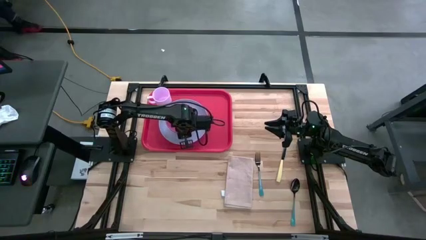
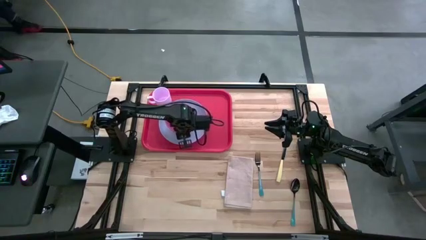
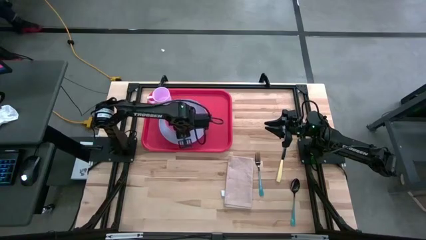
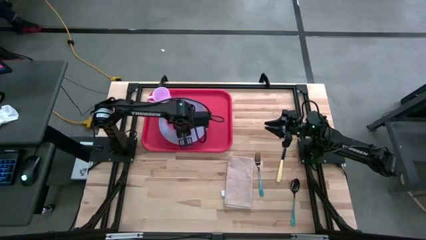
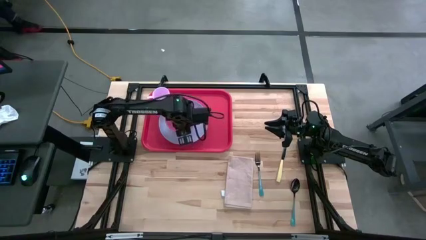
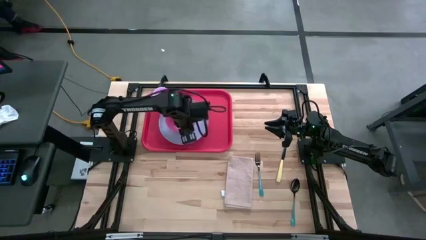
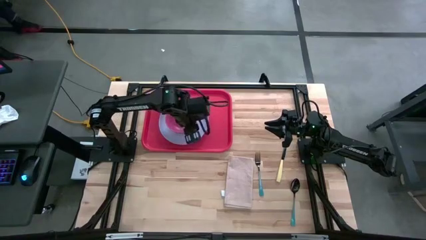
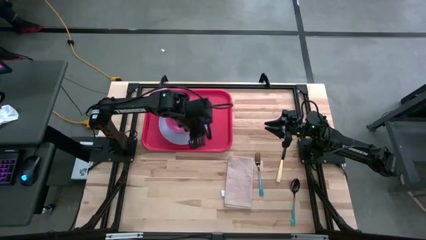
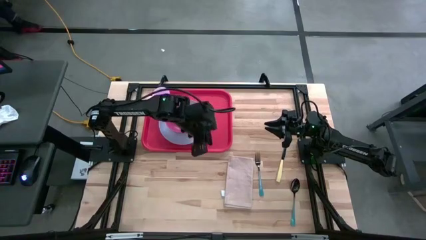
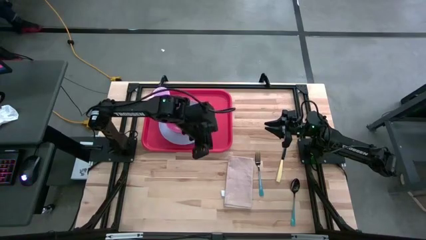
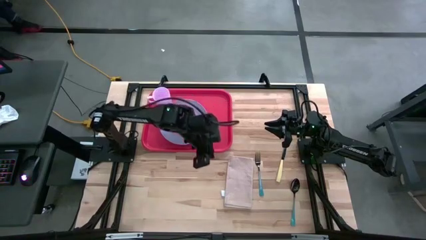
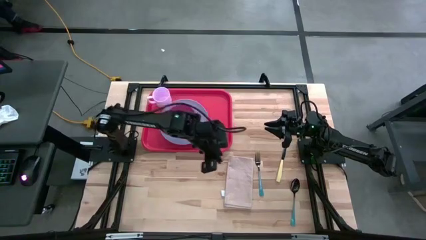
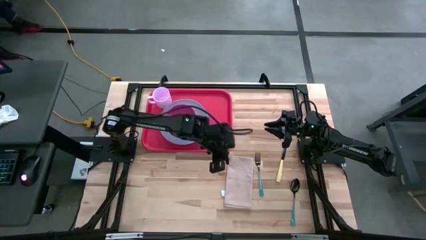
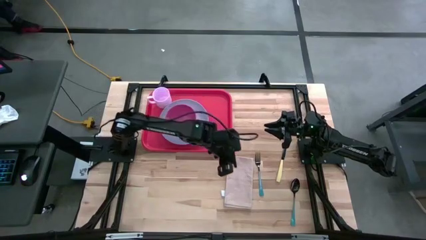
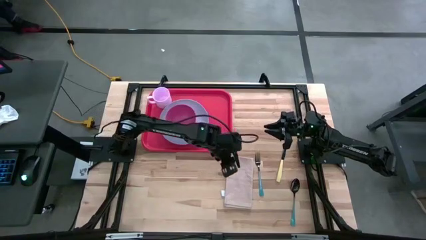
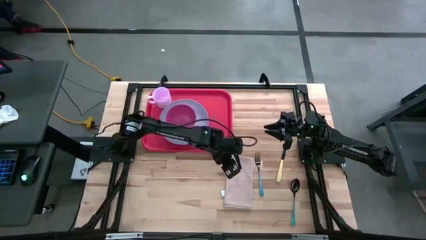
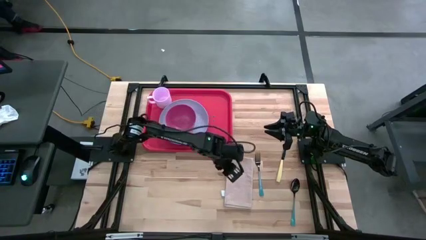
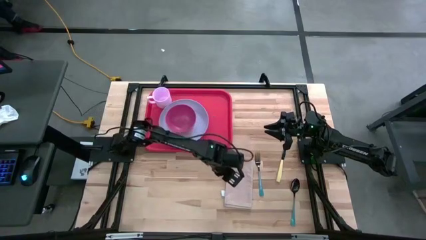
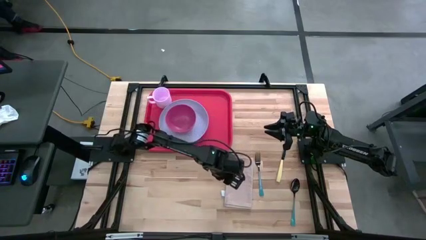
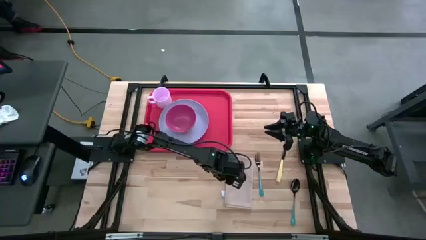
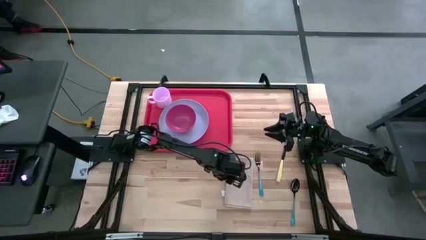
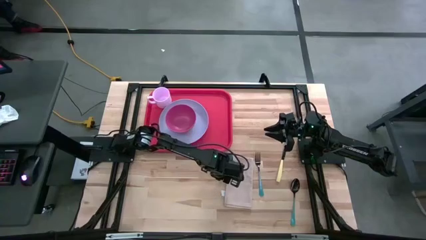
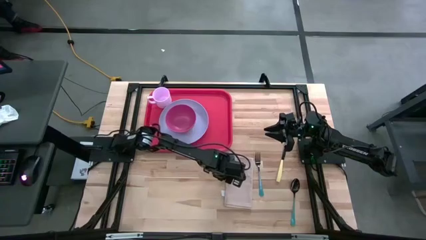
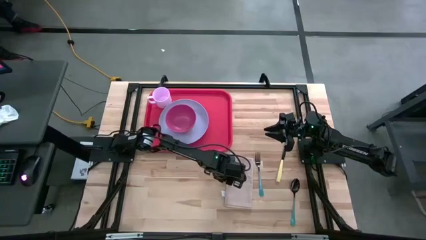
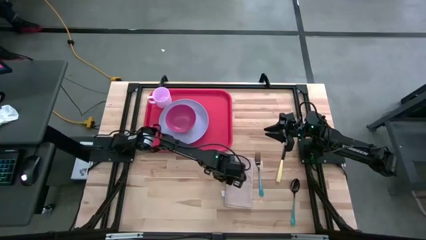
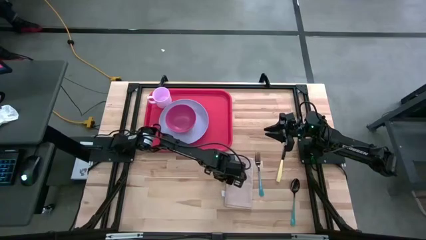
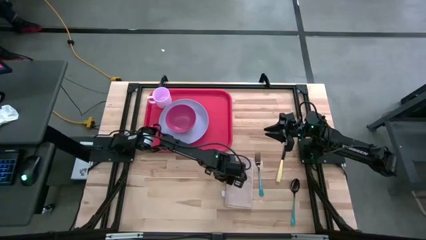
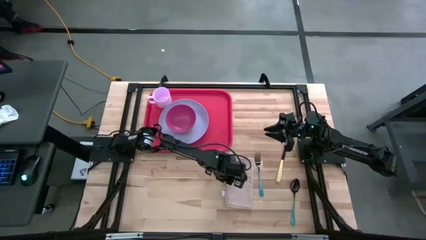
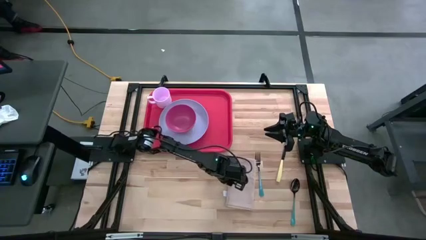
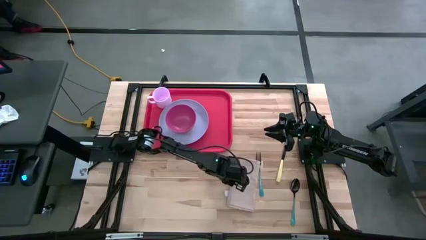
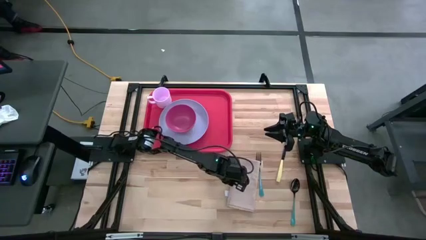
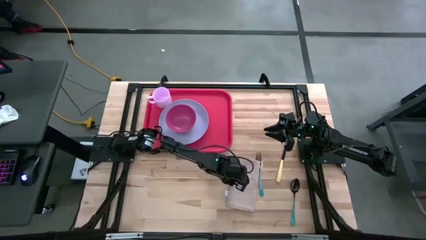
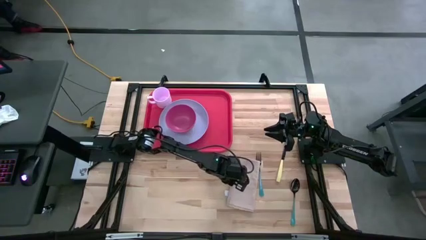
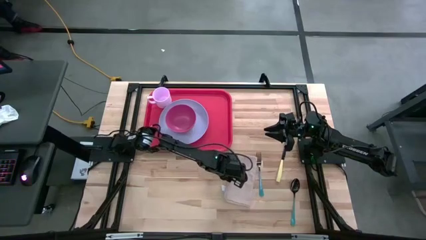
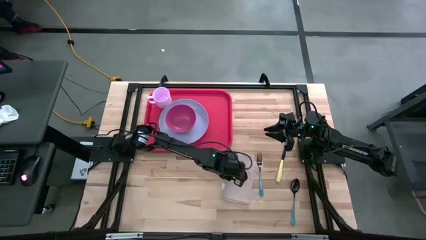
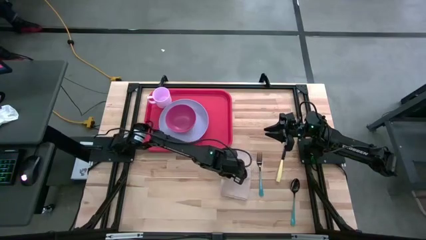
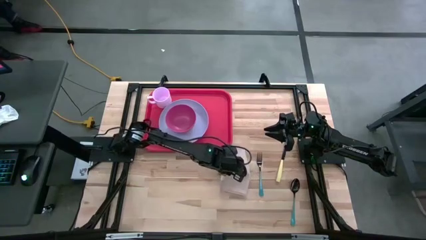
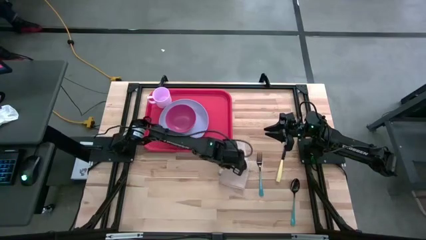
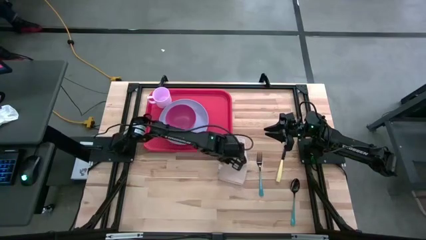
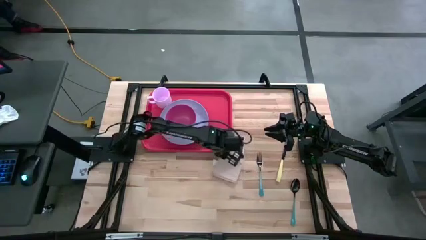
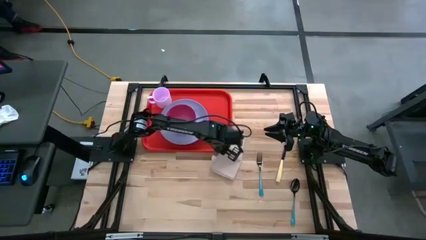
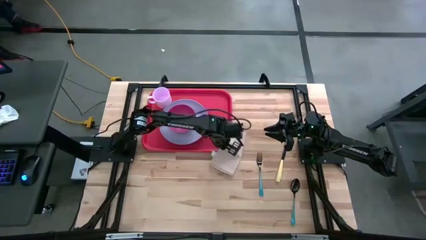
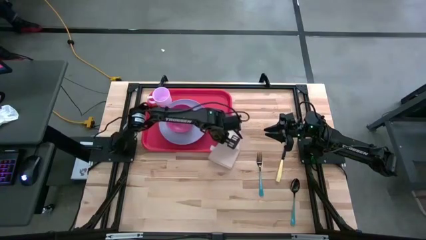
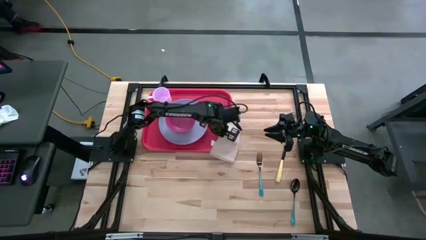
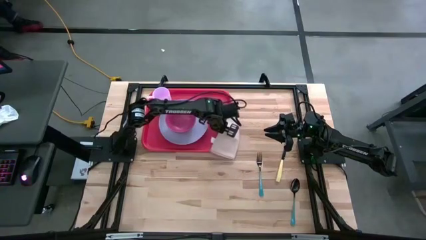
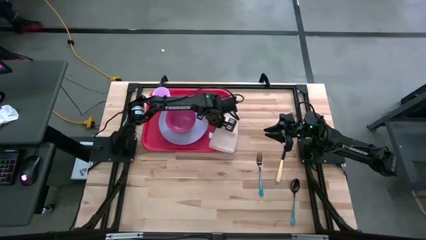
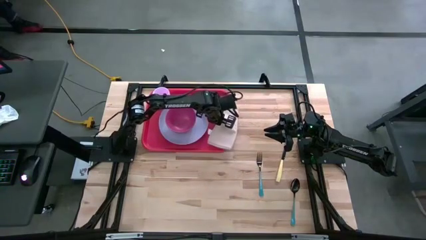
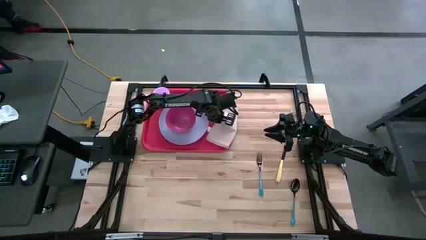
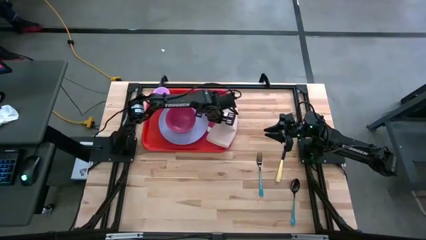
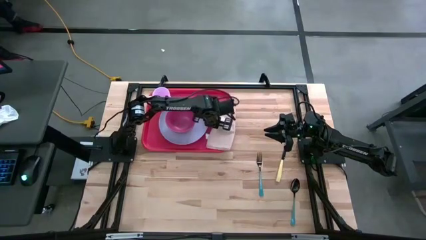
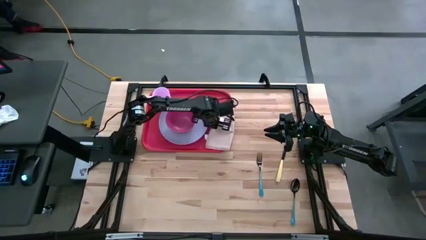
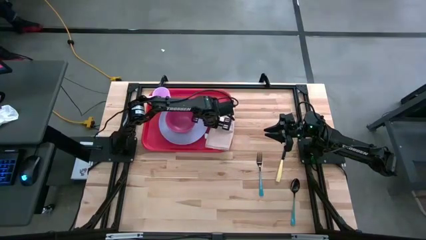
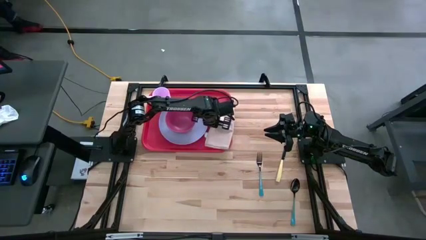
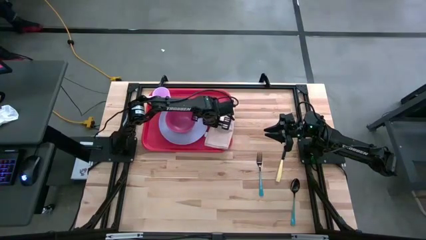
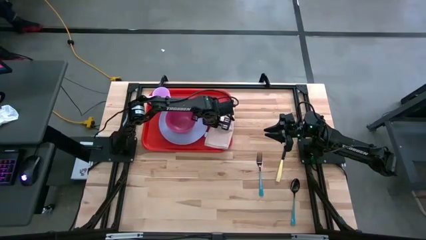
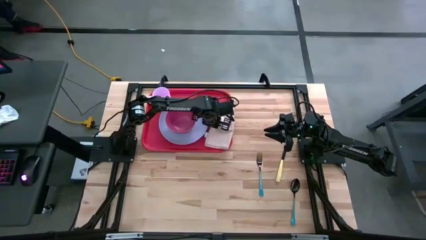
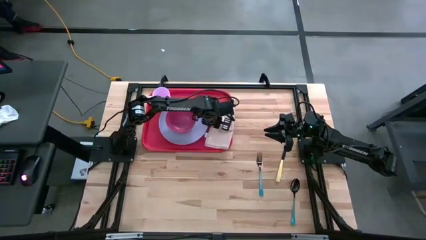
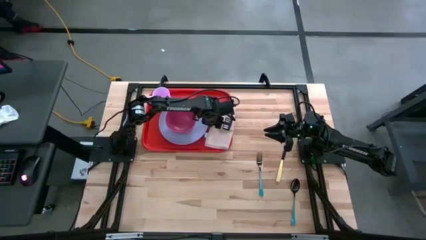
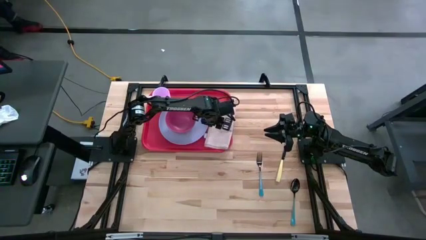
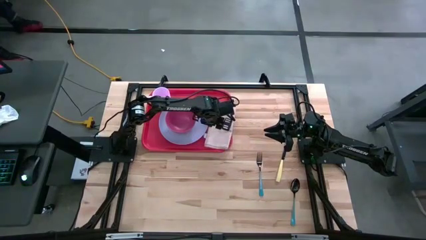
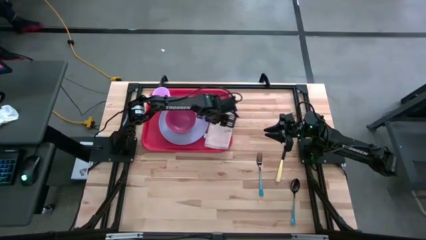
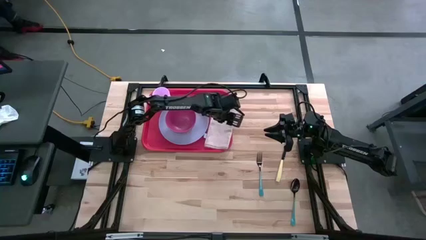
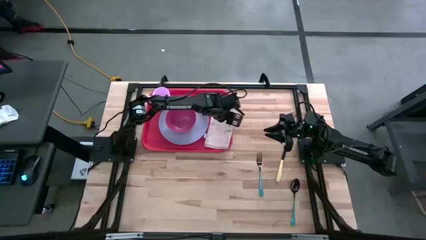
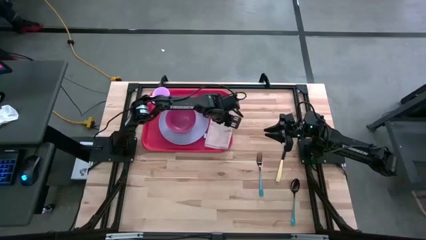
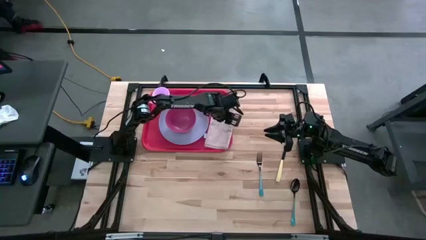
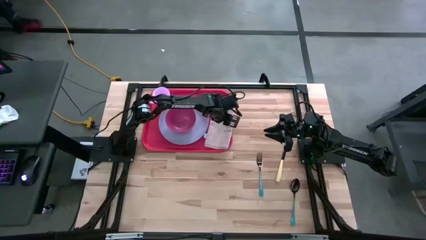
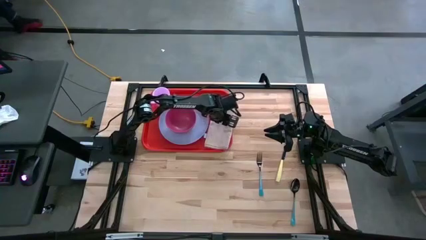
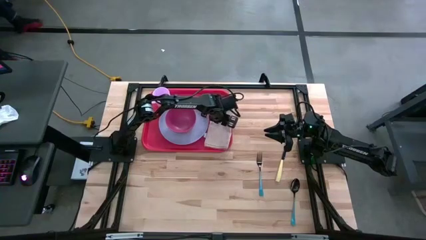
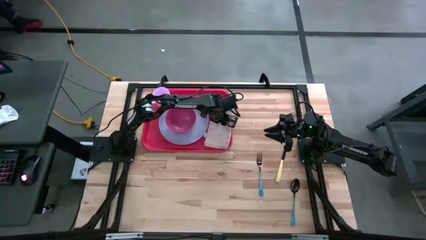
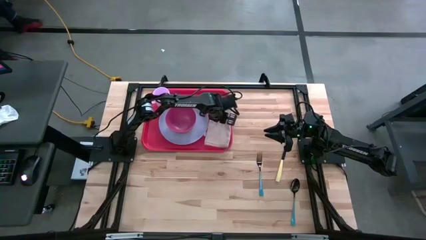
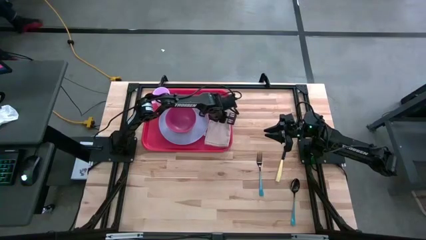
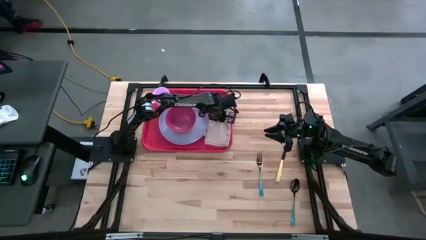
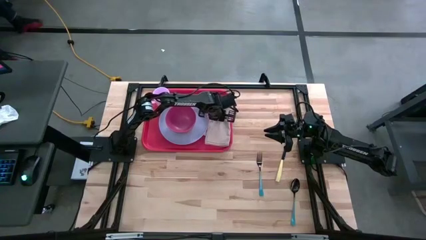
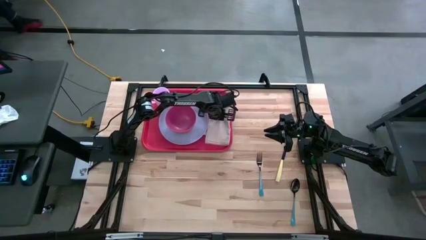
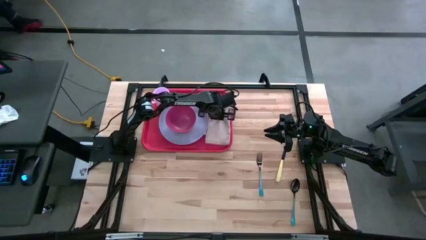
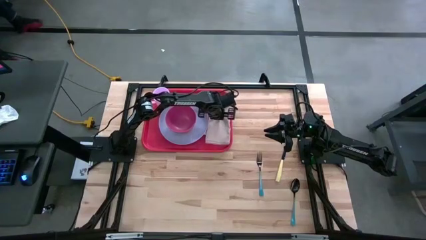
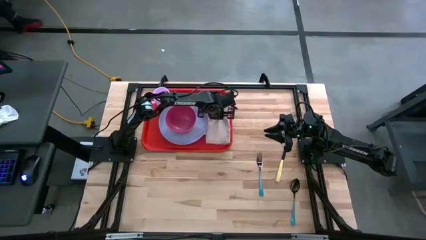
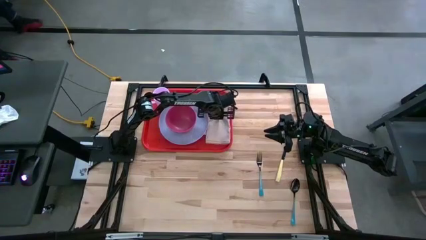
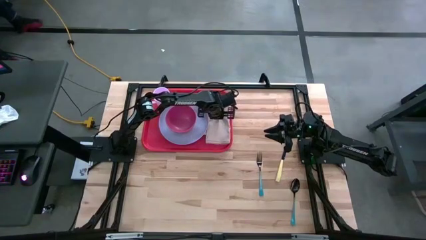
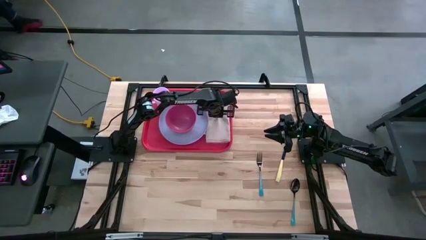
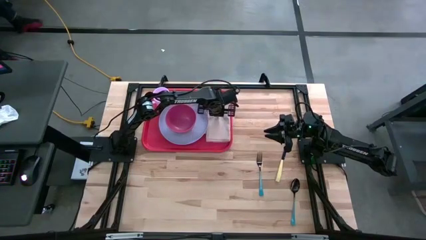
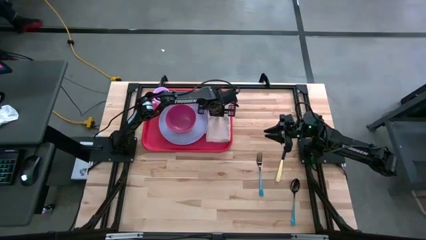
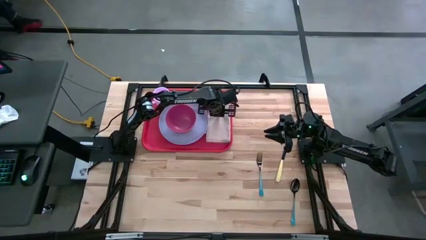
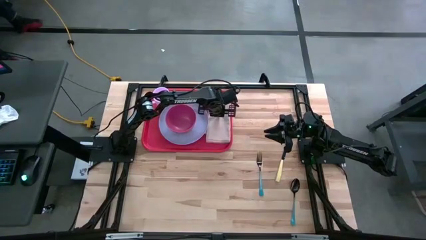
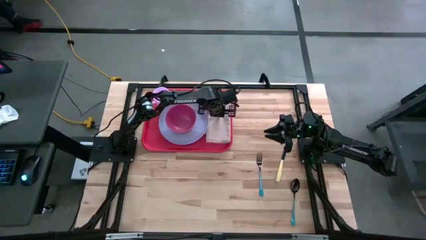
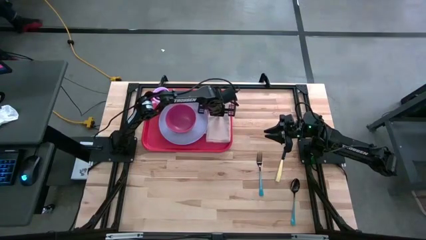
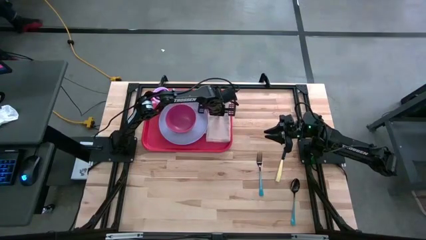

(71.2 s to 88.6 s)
Task: Set up tray
Put the brown napkin beside the blue plate on the red tray
